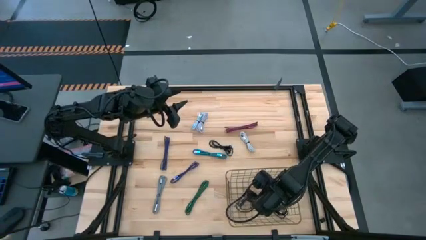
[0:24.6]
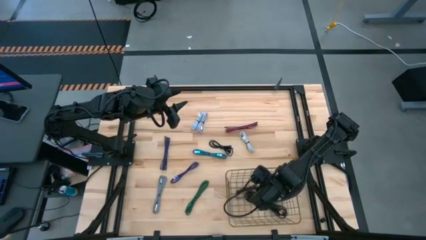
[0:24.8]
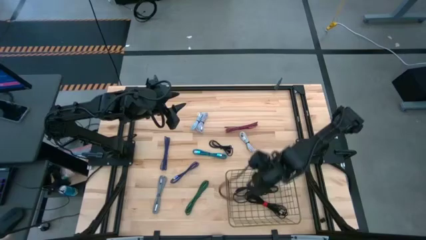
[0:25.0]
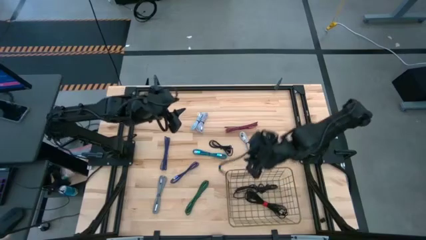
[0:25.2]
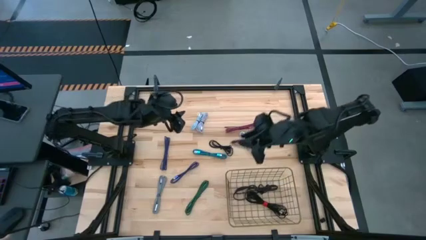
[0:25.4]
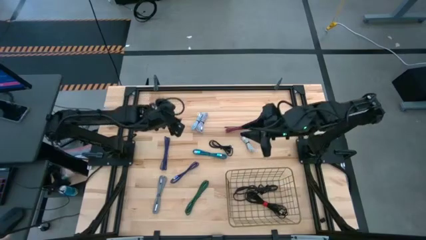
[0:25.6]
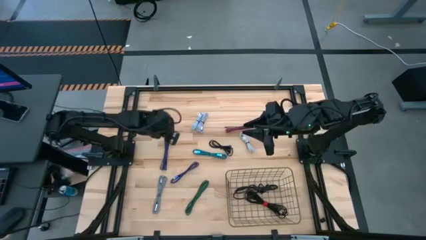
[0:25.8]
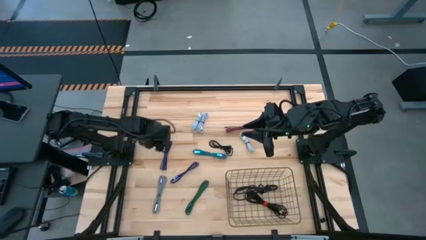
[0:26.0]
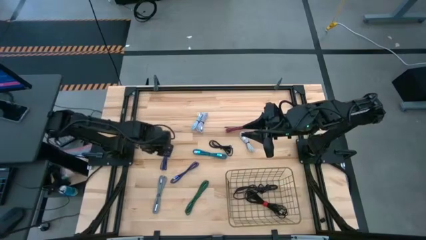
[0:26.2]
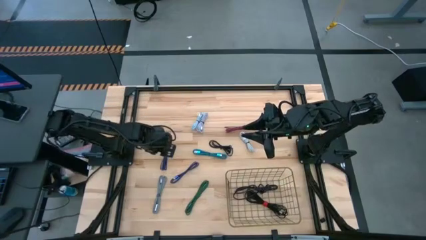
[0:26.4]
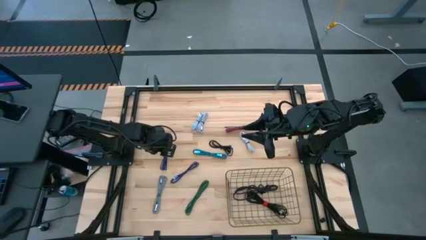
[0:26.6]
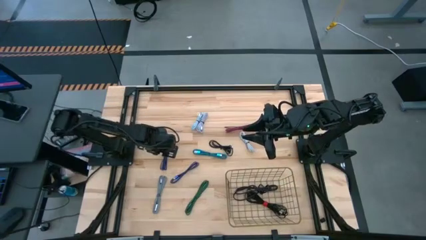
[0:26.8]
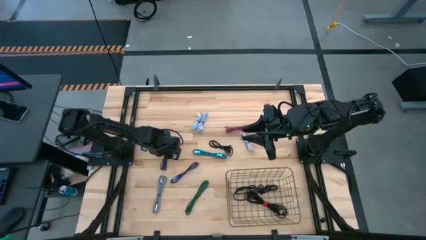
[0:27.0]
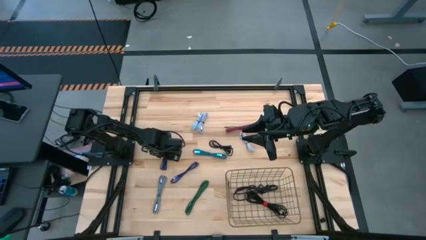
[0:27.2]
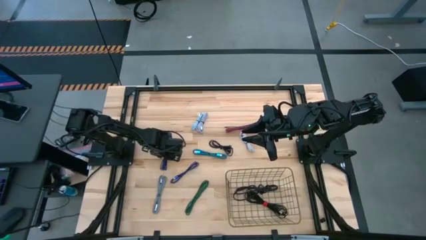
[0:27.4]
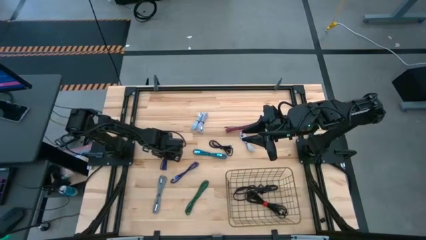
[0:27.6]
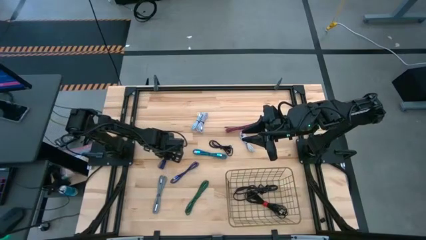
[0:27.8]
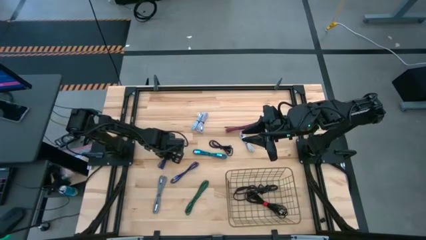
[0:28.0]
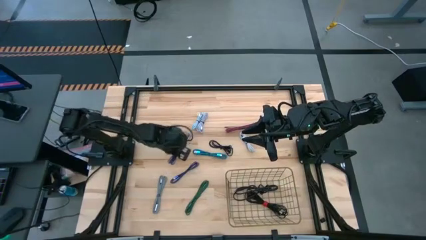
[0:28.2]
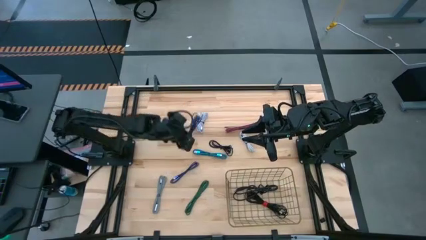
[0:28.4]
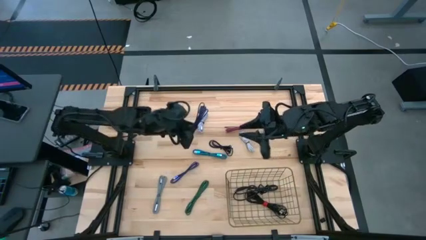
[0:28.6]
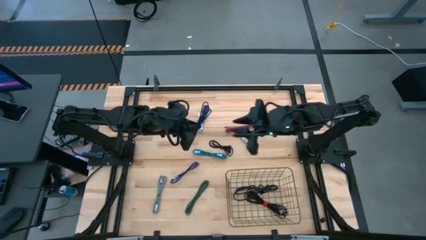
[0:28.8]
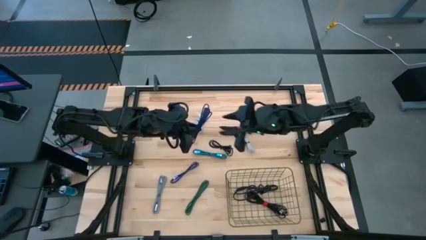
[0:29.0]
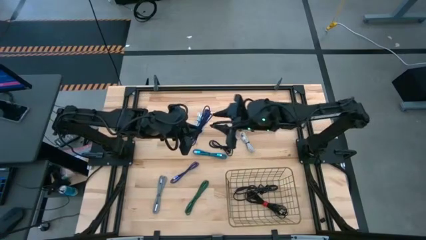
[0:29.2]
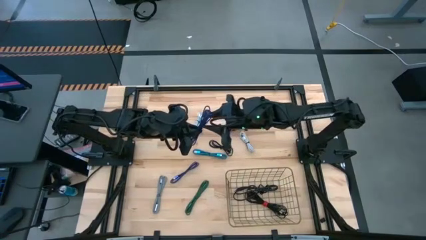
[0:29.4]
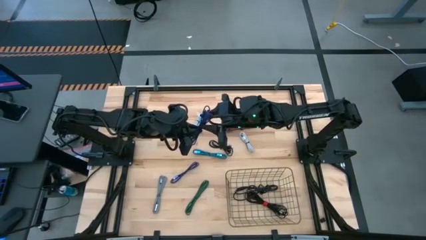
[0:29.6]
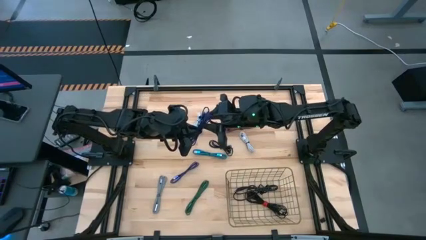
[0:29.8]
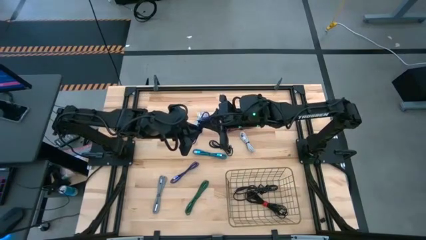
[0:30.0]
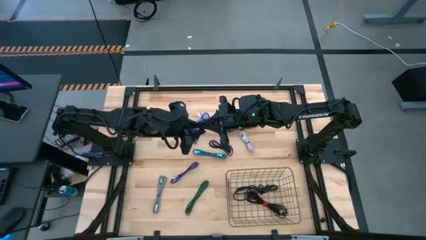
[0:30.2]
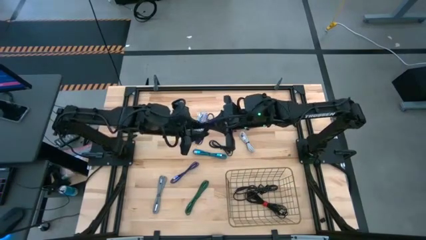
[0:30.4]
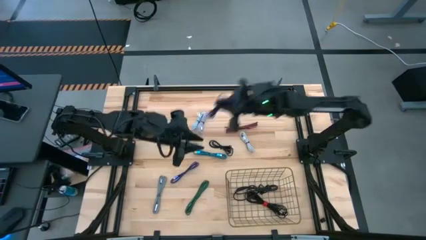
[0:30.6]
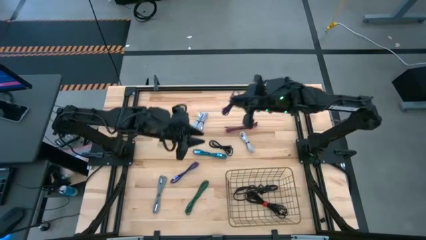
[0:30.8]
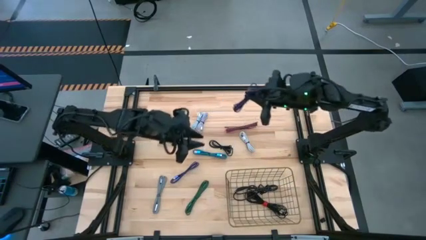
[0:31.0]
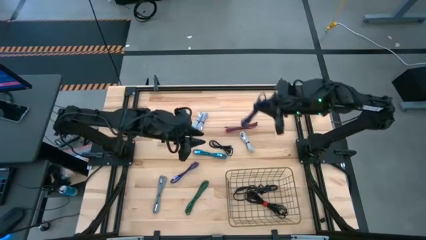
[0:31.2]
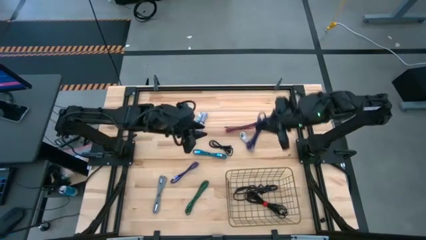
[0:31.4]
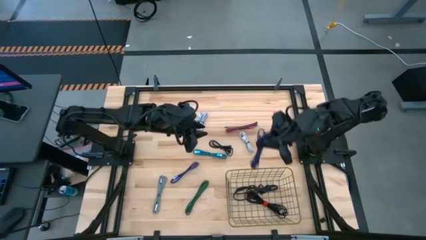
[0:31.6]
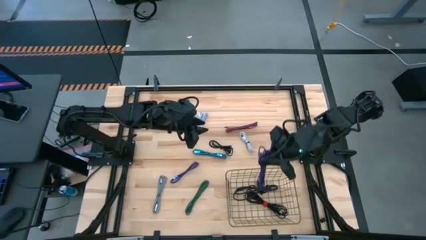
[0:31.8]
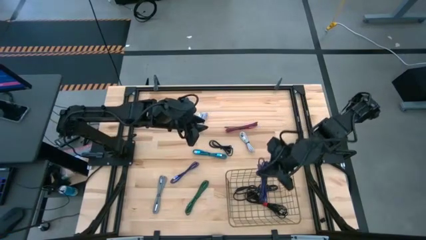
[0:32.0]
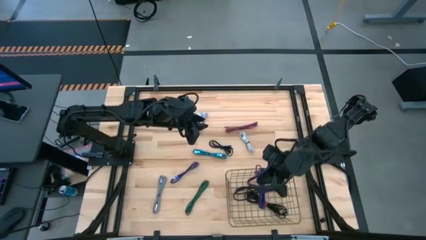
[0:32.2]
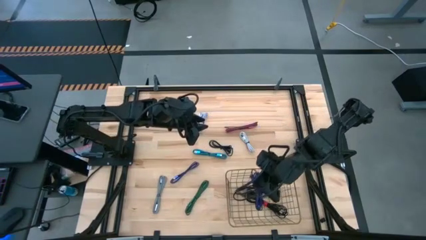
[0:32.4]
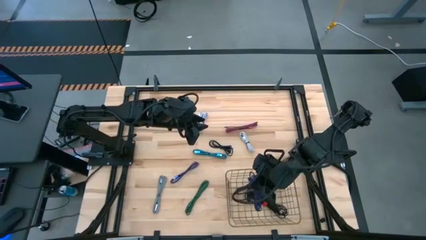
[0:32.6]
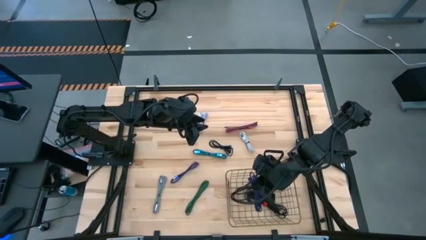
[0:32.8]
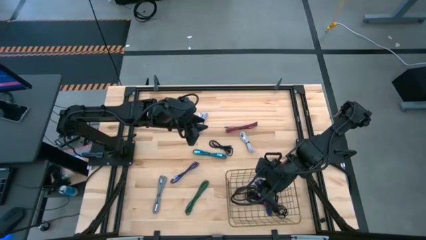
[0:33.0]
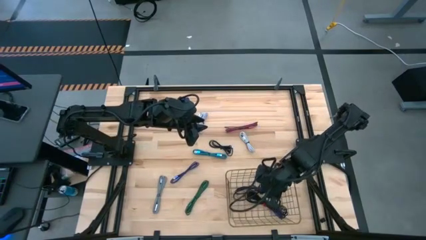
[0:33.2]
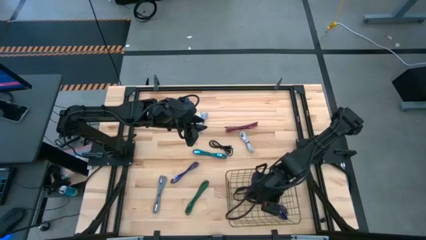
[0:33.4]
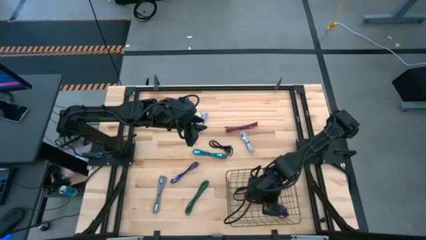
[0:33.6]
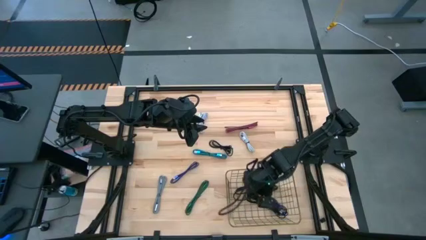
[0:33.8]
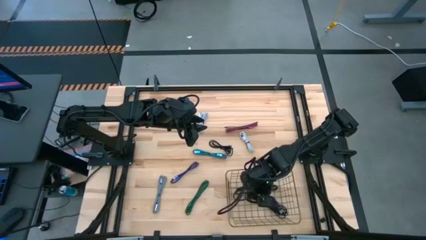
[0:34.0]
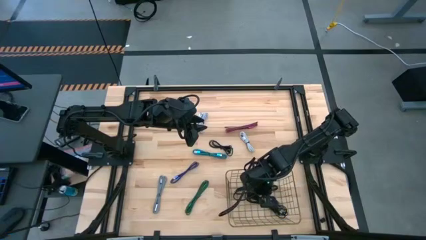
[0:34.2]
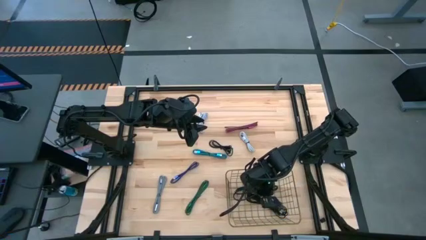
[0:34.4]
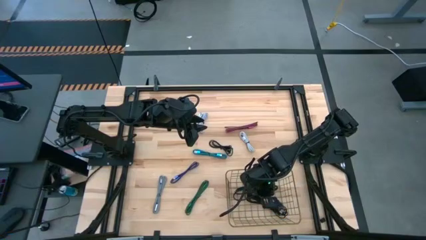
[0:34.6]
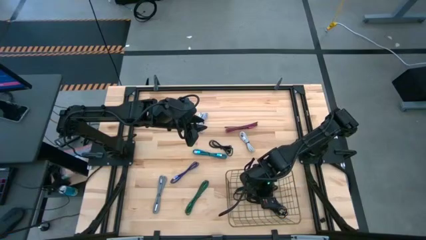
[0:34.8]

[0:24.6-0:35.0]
Task: Pick and place USB-C Cables
Put the top black purple charger cable into the wire basket

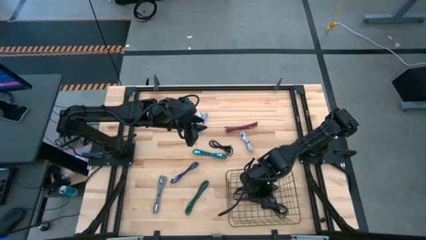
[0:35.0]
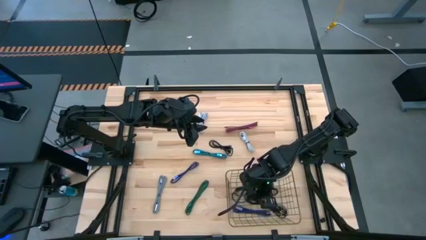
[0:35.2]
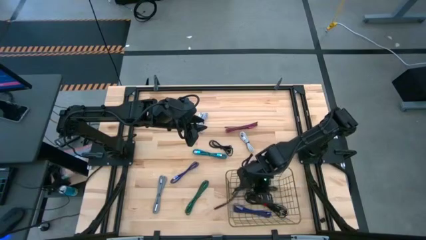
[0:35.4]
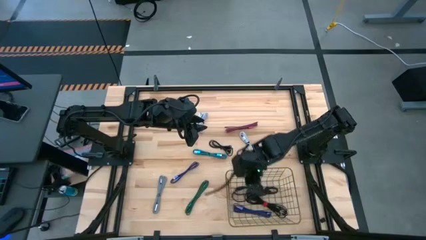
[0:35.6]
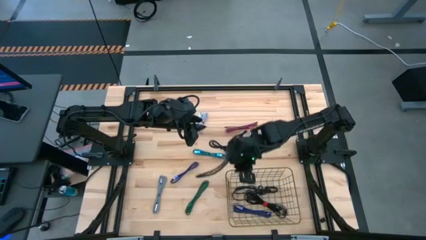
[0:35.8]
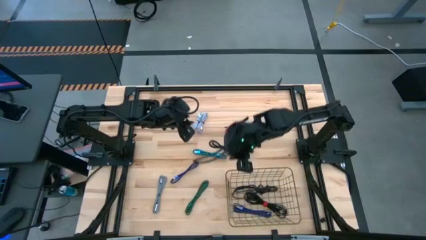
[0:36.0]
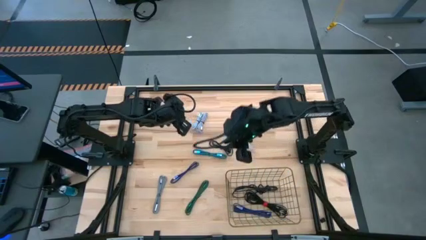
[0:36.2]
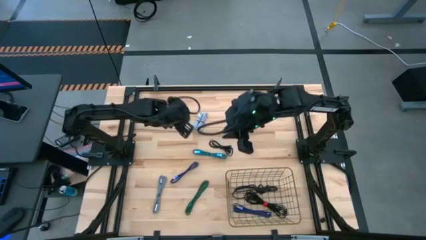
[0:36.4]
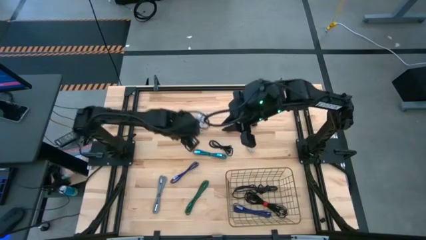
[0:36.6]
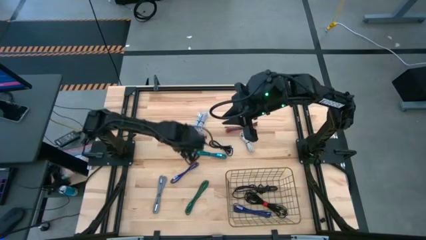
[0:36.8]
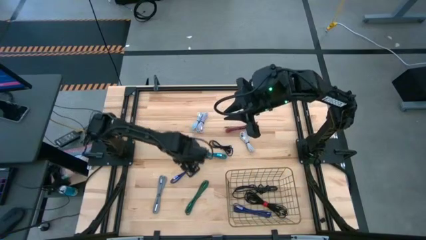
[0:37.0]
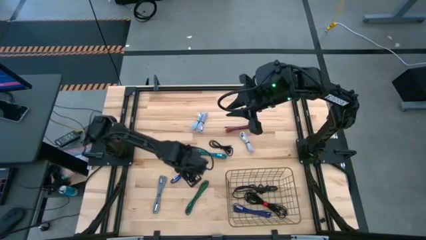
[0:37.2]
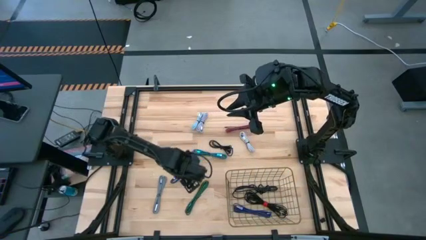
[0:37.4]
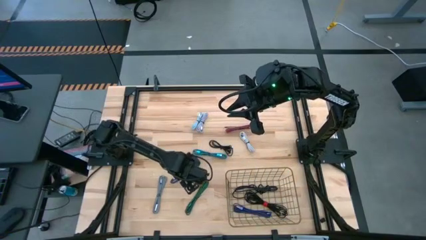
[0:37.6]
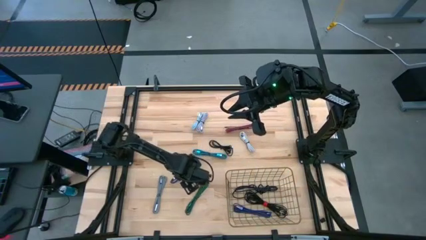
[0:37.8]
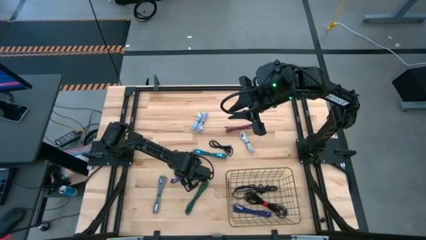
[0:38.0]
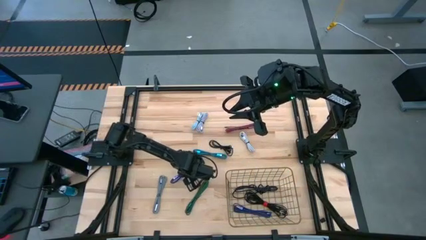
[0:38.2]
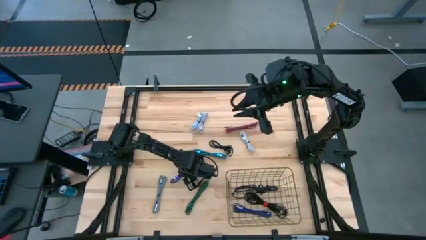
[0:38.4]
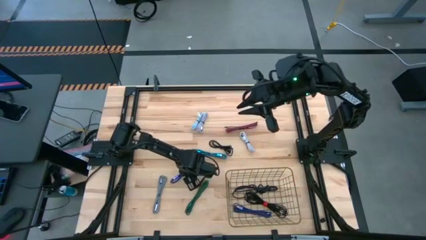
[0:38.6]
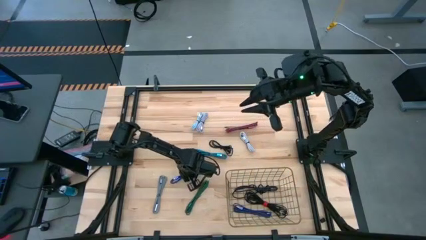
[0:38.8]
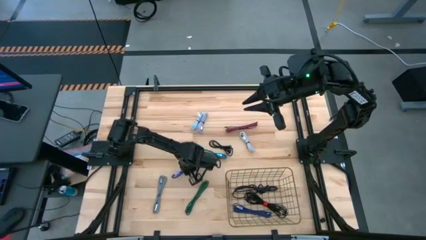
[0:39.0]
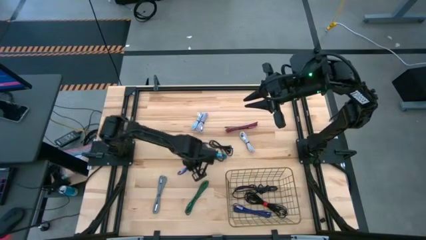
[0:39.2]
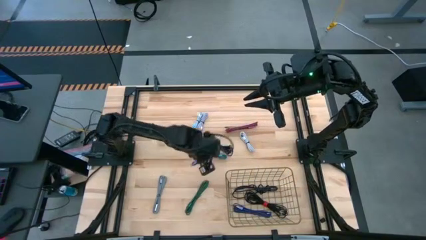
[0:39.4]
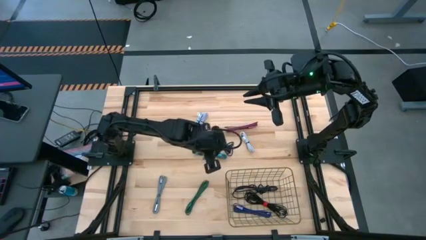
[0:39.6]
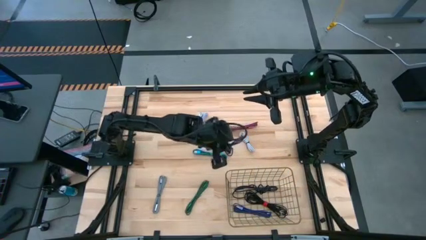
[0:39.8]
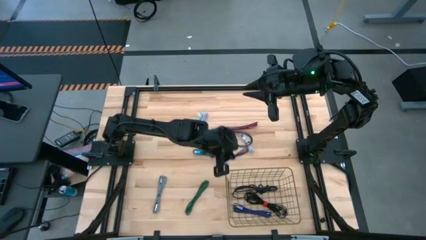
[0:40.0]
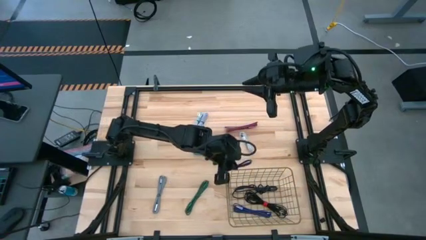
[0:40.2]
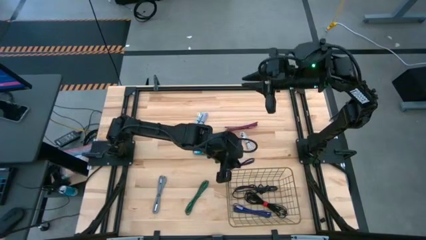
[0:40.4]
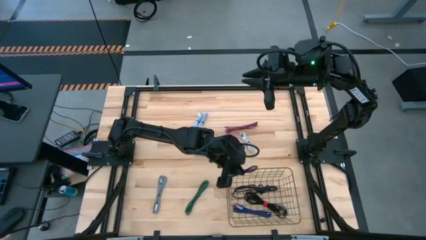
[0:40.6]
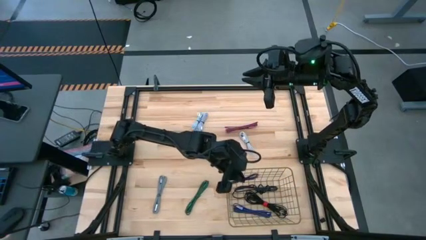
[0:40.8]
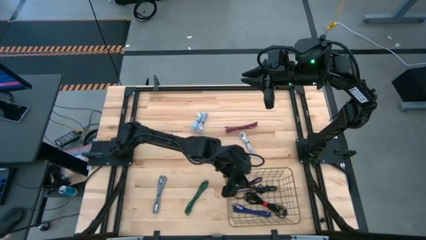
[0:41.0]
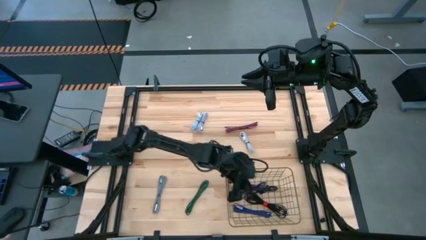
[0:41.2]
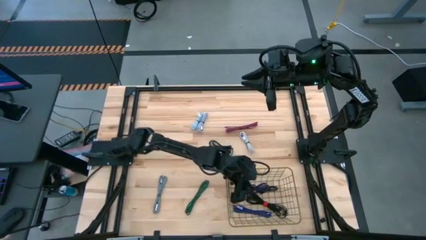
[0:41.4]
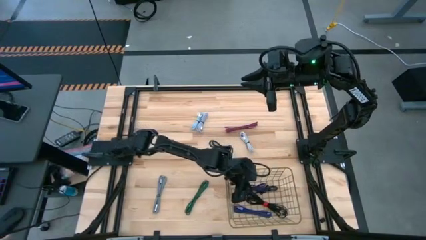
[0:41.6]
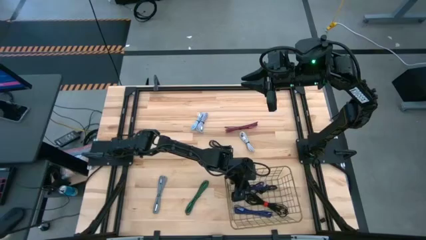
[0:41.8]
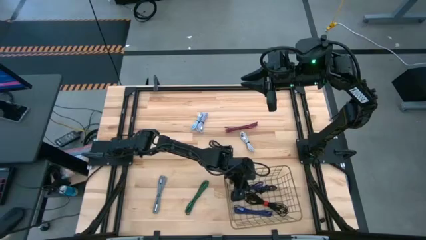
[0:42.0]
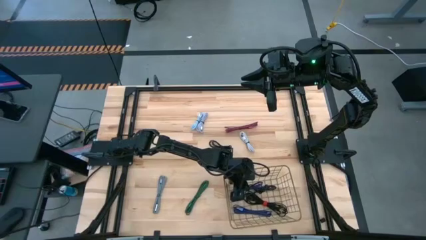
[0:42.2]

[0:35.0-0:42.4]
Put the purple charger cable into the wire basket
